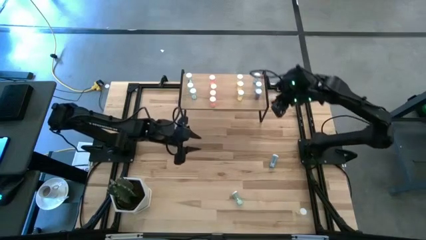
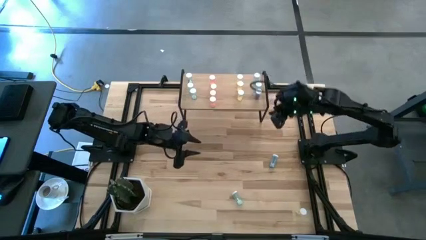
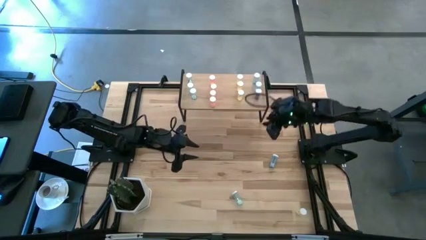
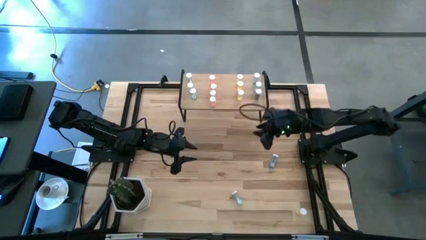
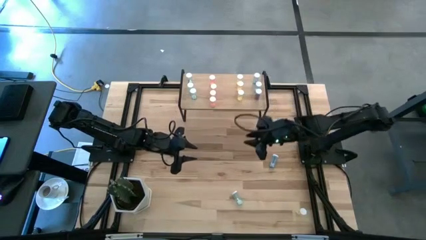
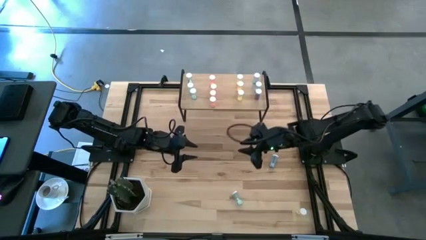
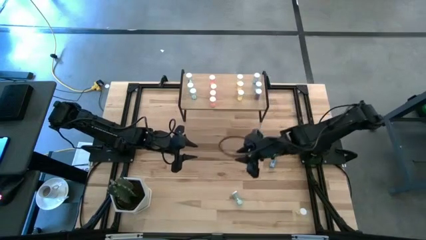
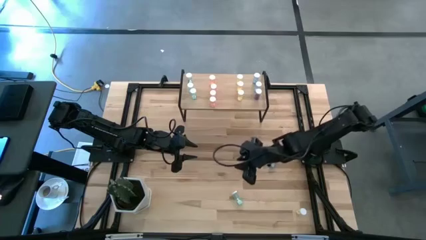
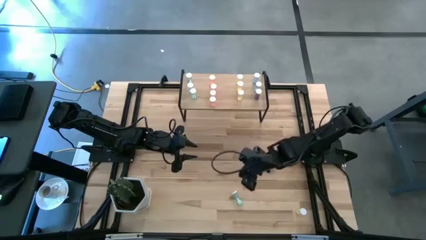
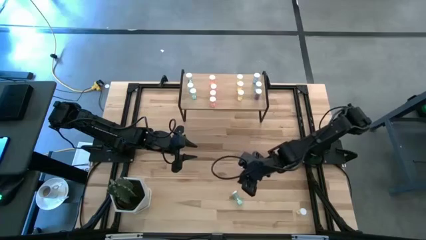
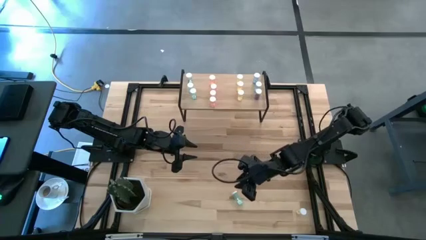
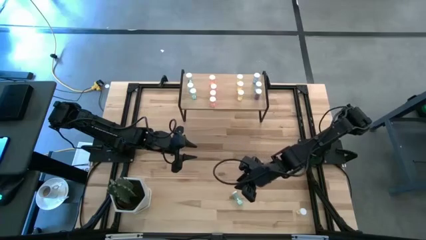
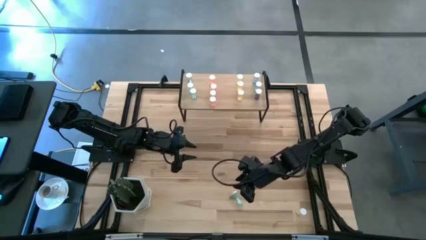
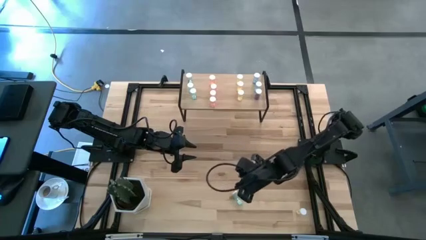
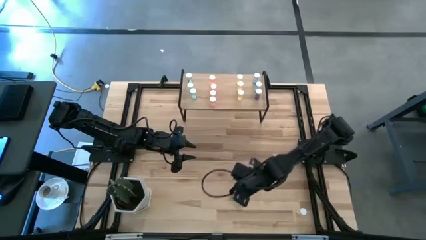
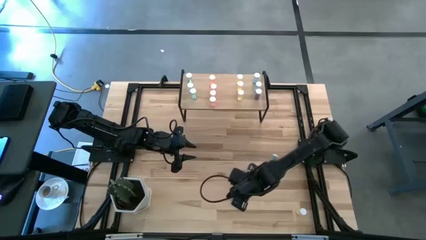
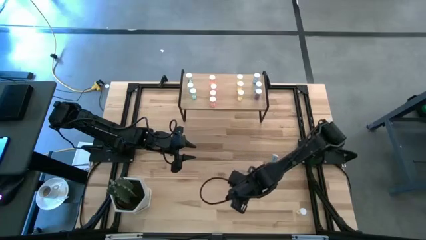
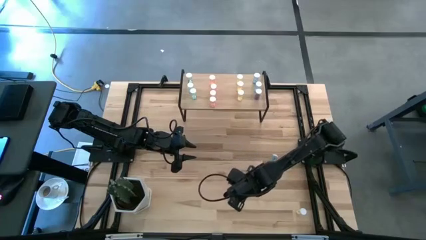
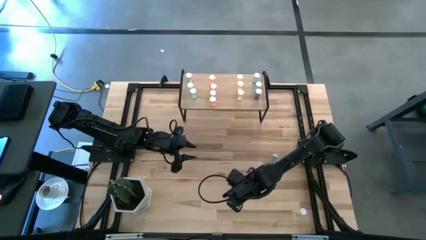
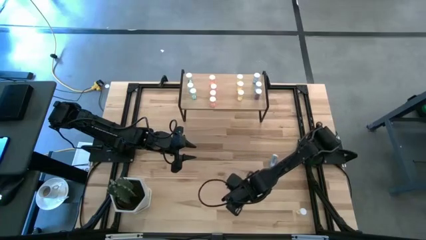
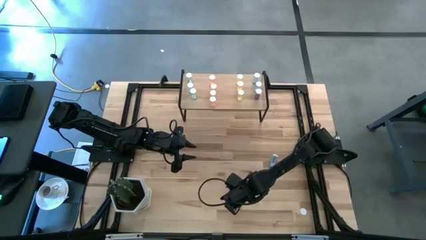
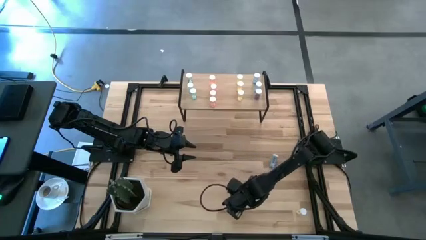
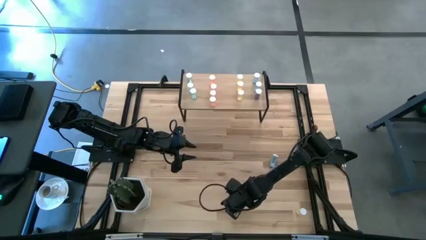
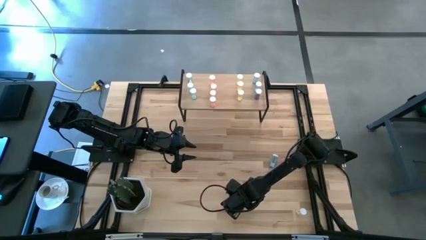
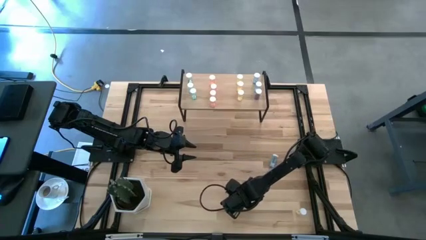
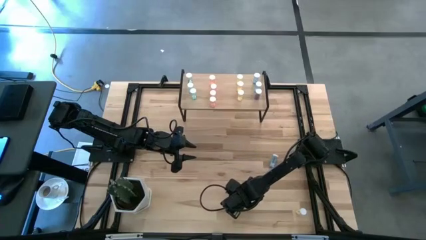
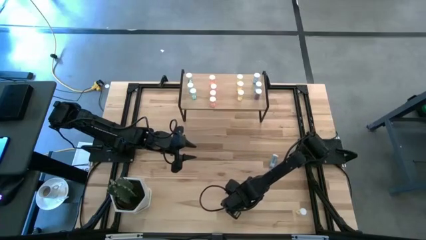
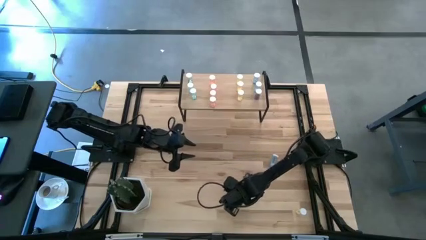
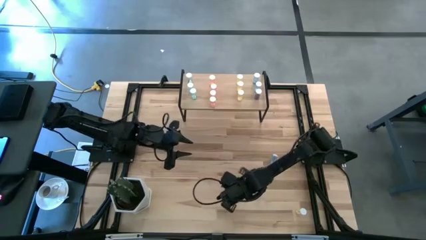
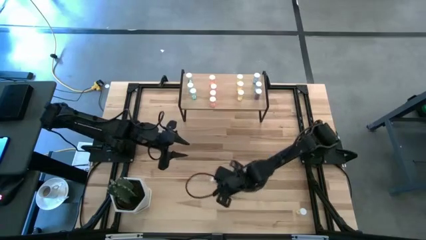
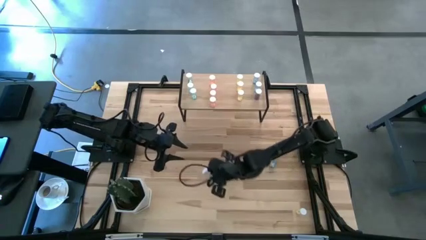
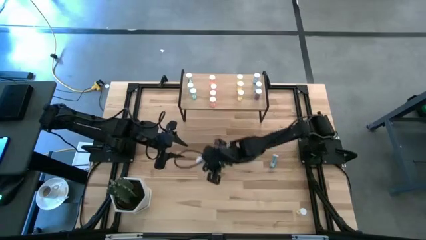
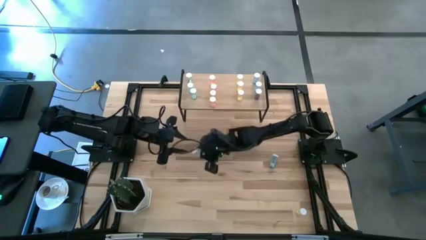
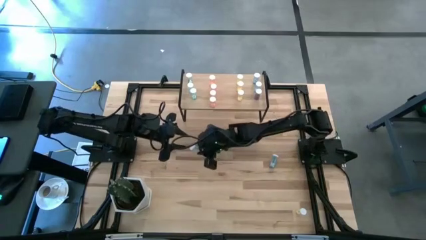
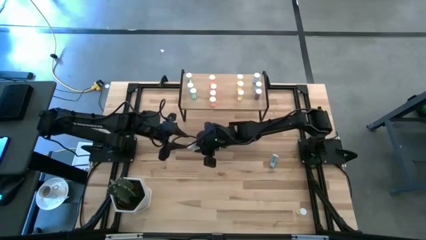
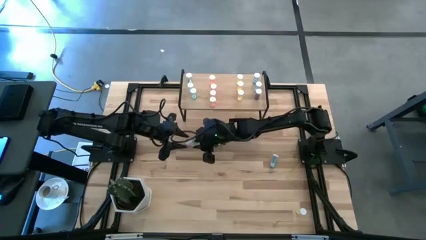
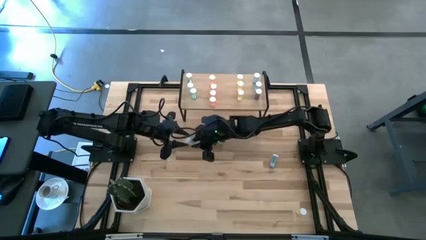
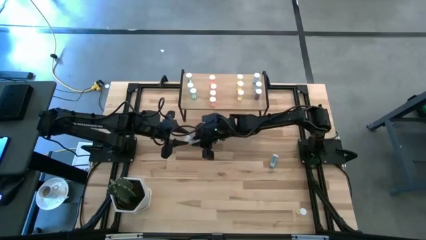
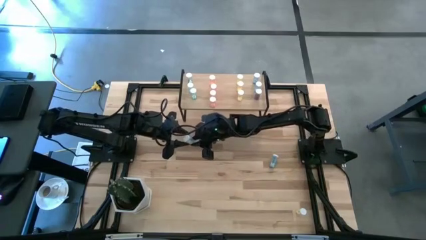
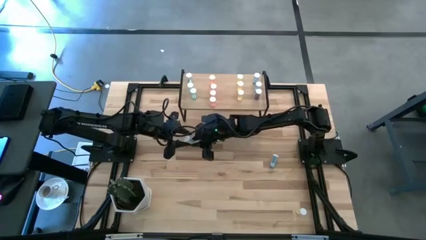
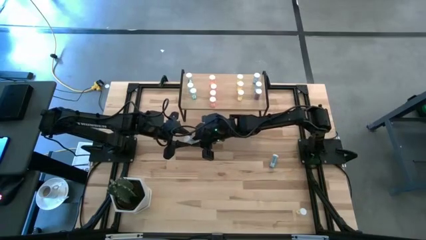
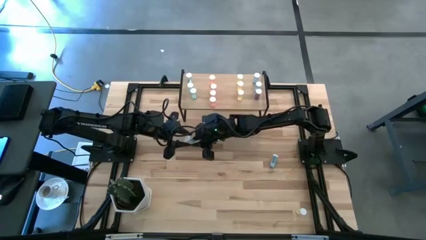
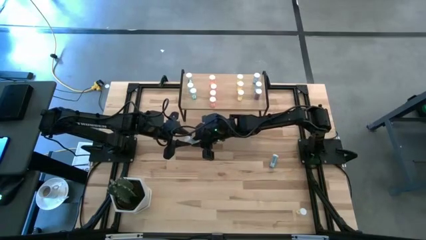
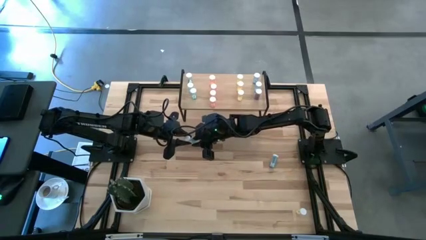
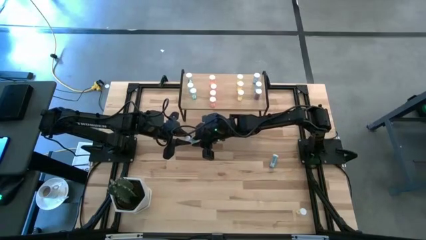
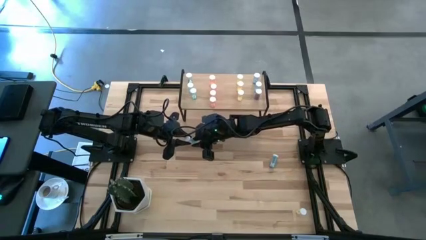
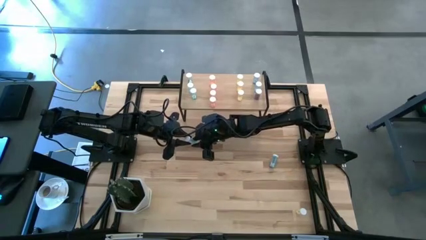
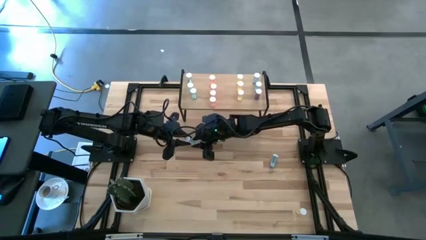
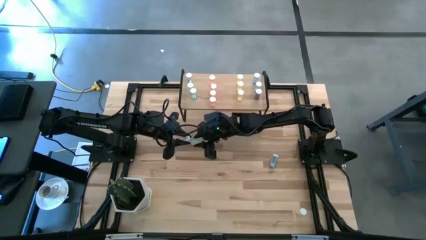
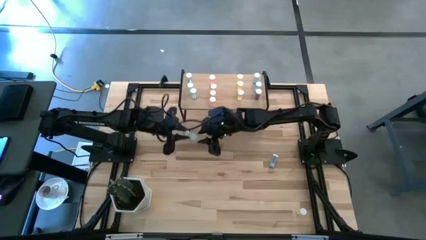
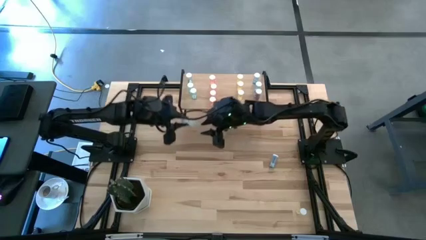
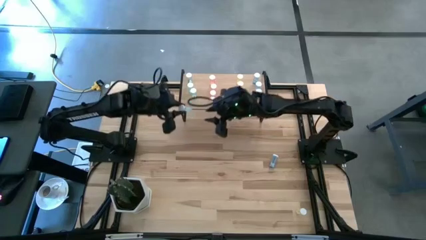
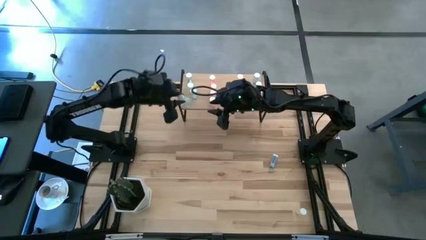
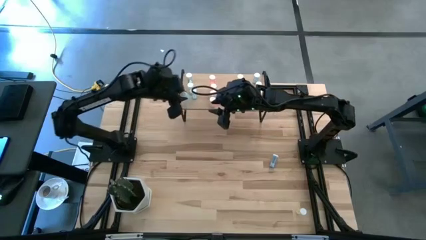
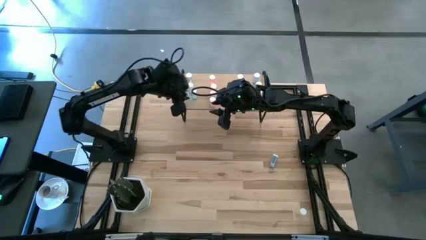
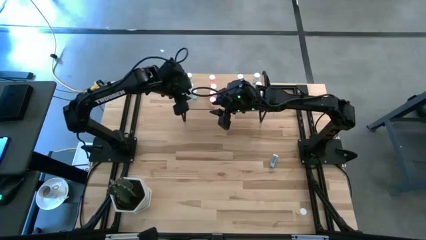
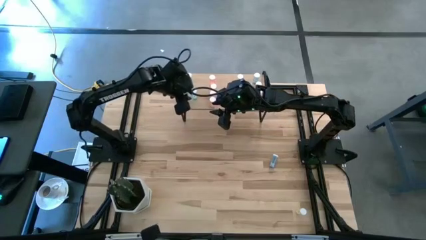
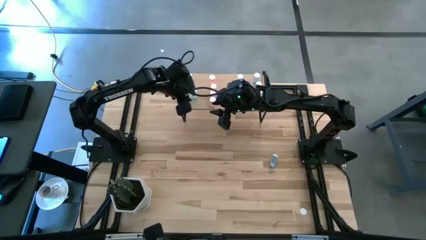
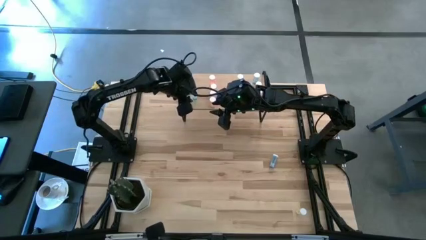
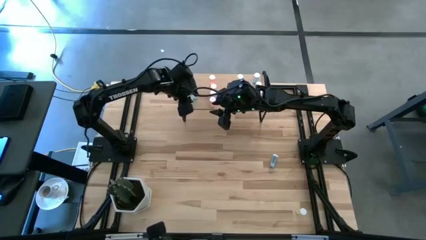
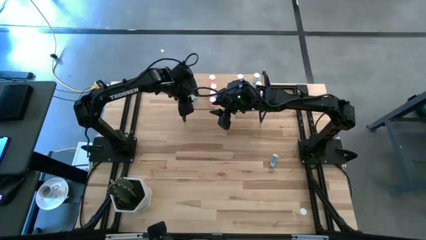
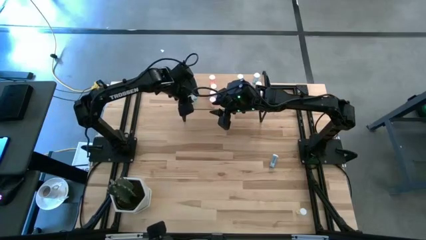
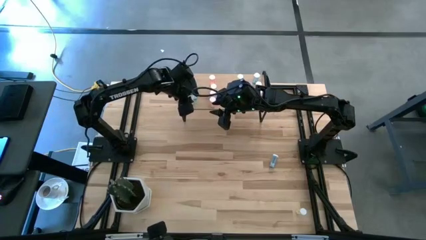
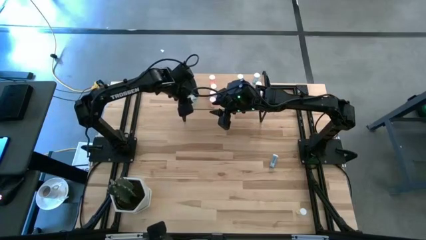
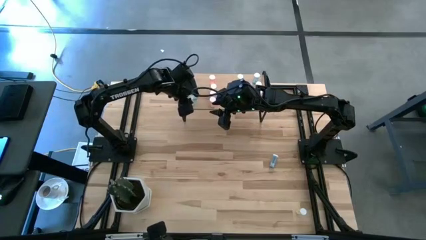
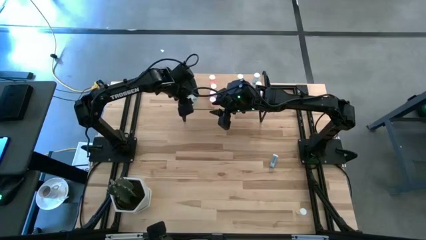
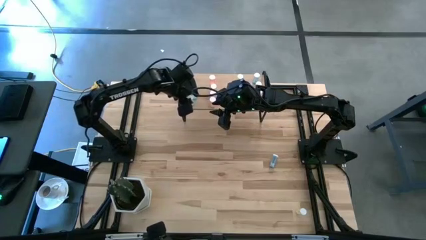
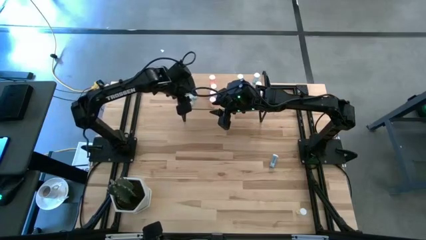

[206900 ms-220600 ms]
Task: Pick and place medicine bottles onto shelf by color
Align the green pill bottle with the green pill bottle

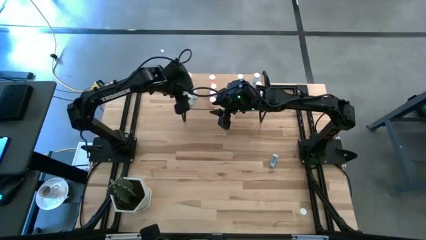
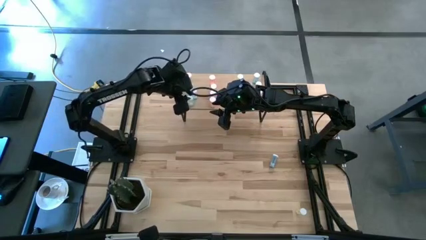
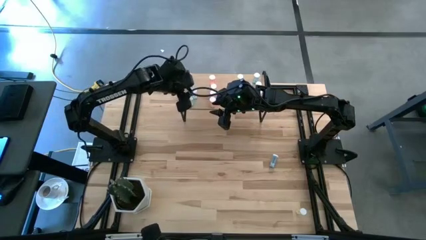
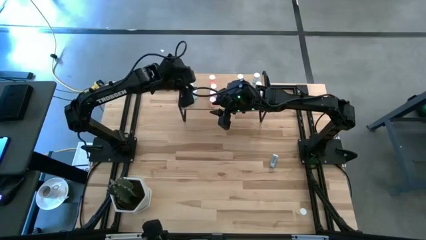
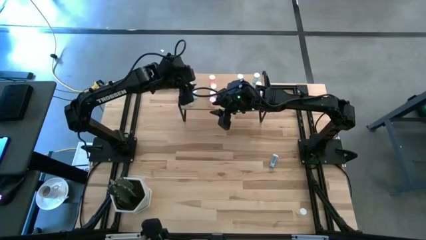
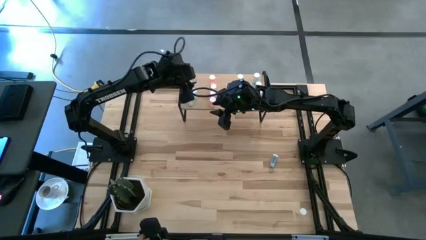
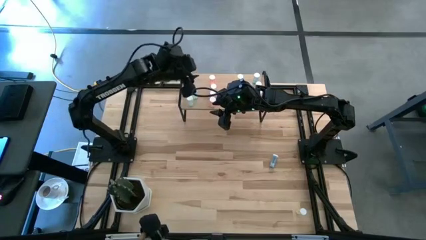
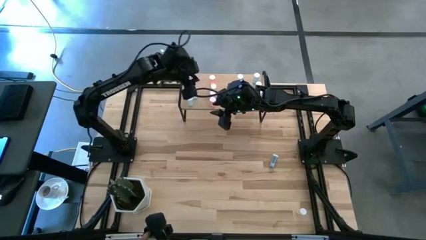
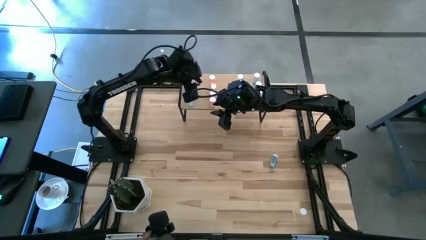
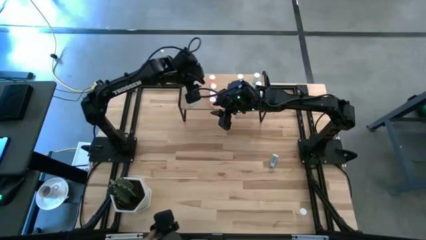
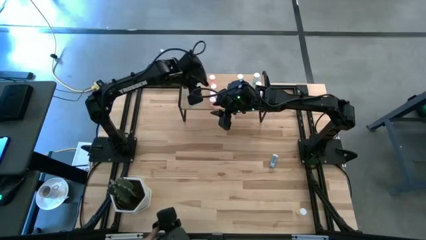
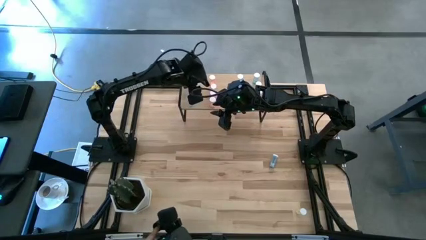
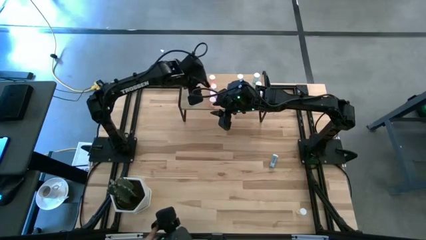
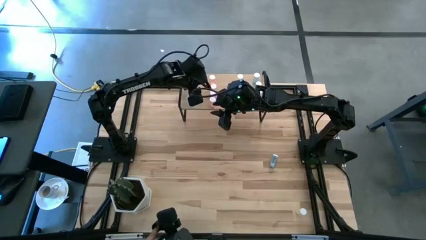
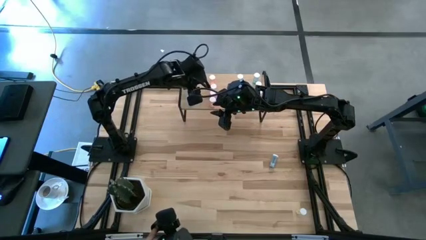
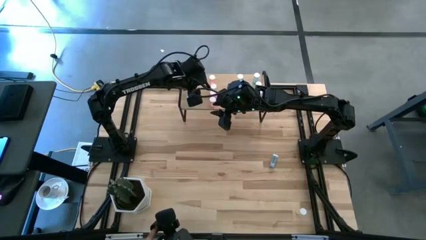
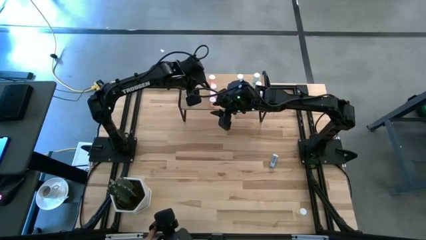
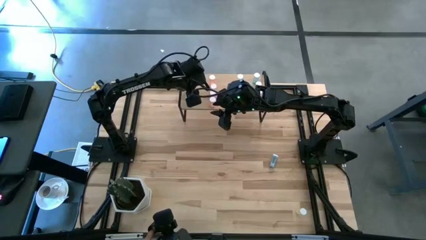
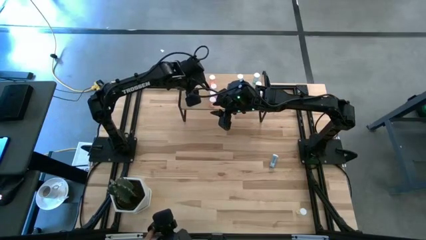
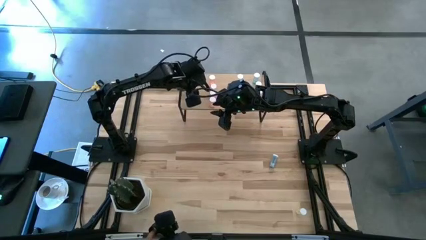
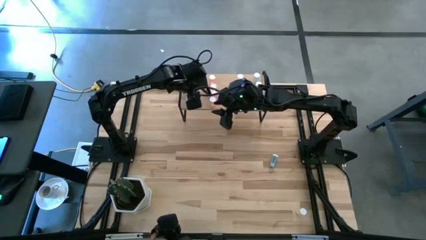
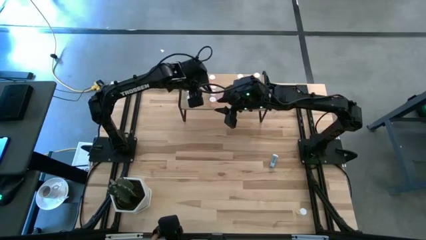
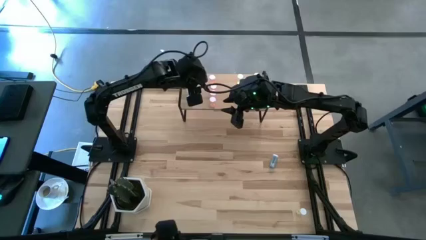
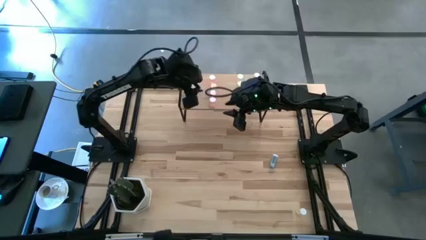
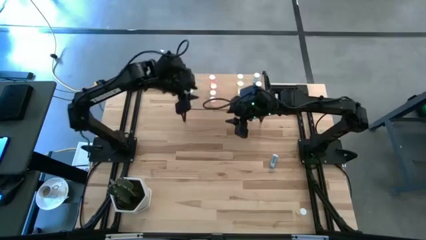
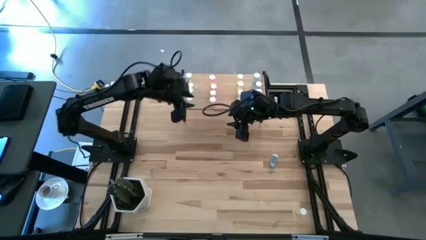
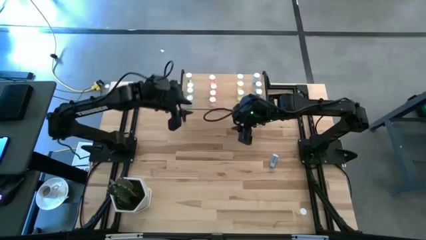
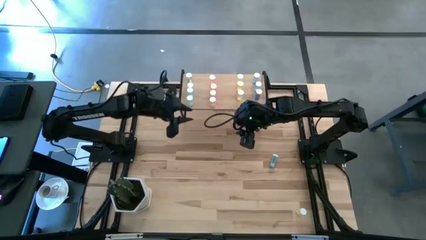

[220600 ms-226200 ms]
Adjust the green pill bottle on the shelf
